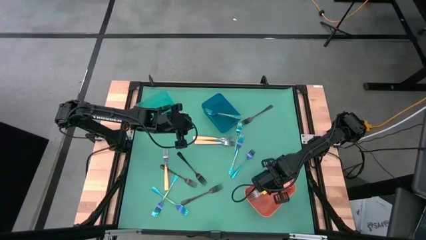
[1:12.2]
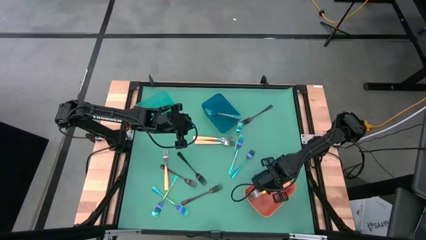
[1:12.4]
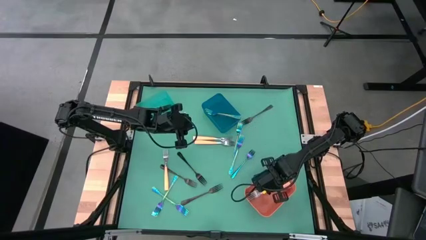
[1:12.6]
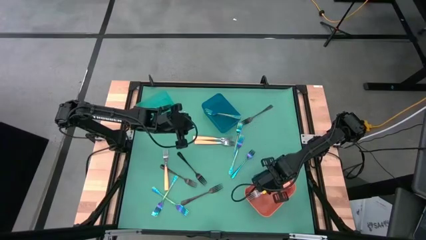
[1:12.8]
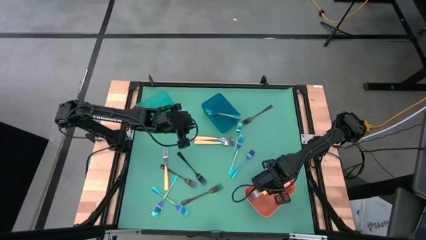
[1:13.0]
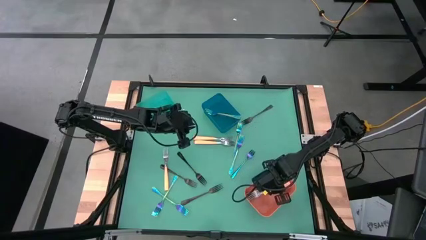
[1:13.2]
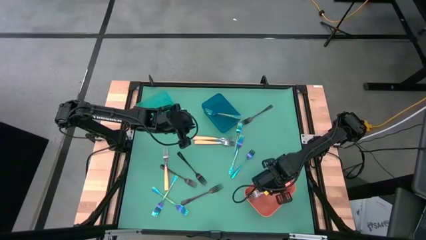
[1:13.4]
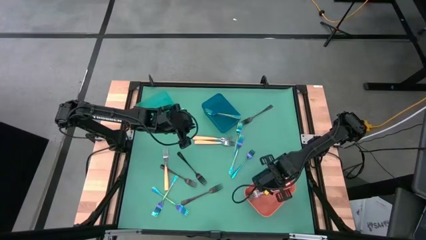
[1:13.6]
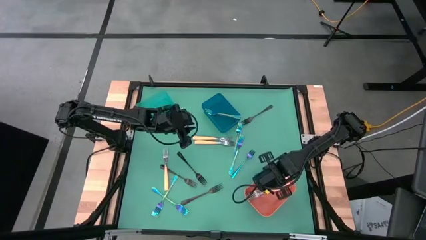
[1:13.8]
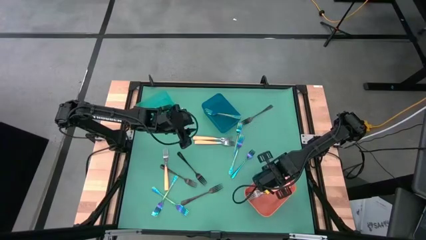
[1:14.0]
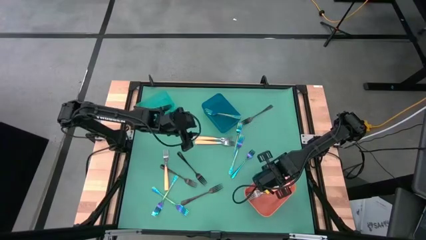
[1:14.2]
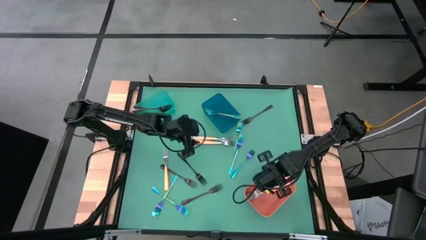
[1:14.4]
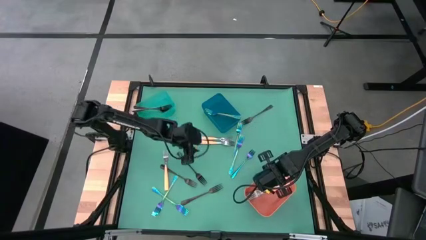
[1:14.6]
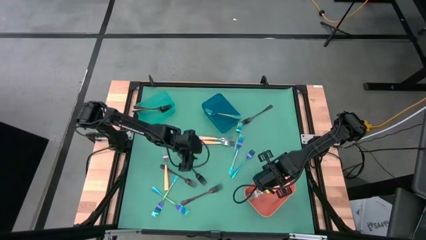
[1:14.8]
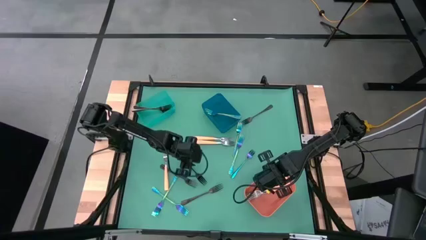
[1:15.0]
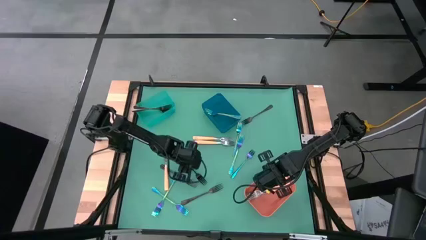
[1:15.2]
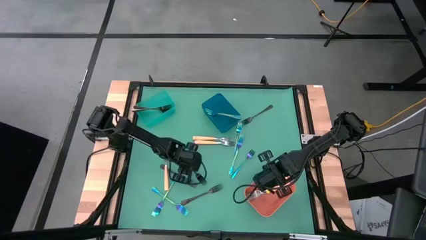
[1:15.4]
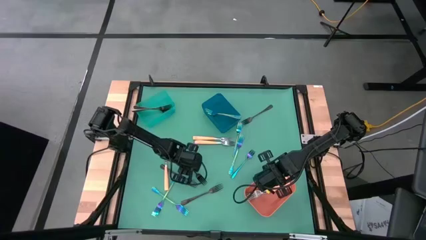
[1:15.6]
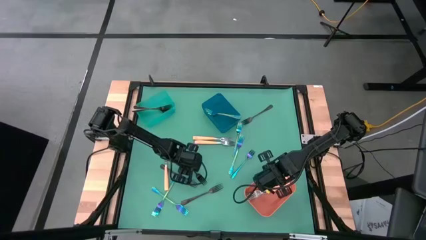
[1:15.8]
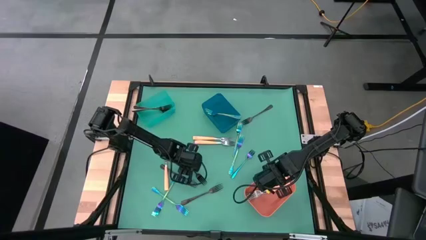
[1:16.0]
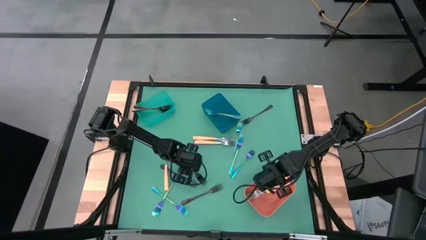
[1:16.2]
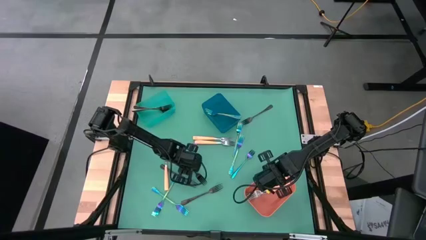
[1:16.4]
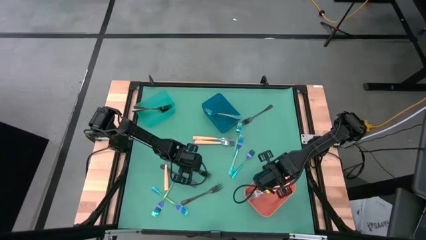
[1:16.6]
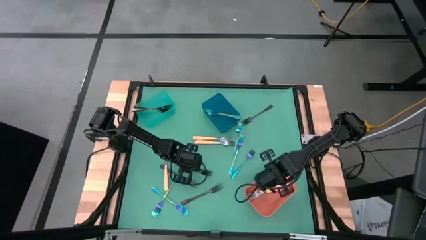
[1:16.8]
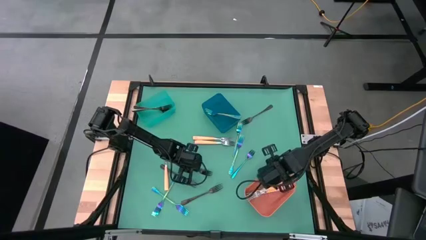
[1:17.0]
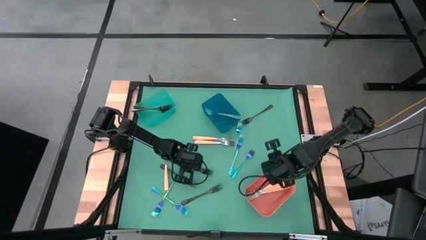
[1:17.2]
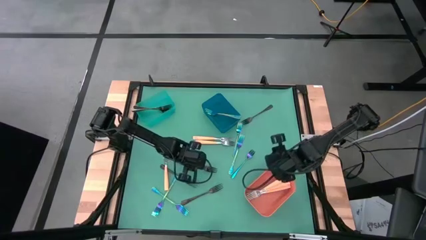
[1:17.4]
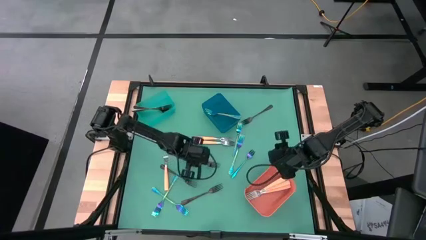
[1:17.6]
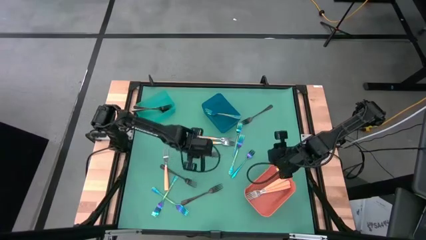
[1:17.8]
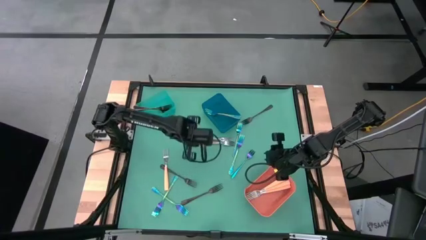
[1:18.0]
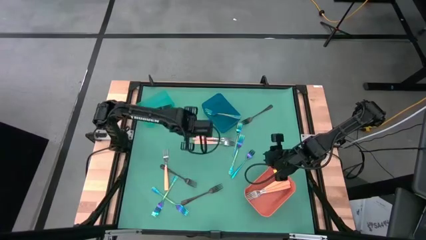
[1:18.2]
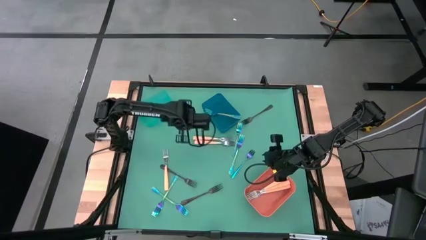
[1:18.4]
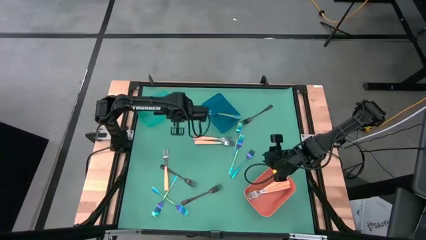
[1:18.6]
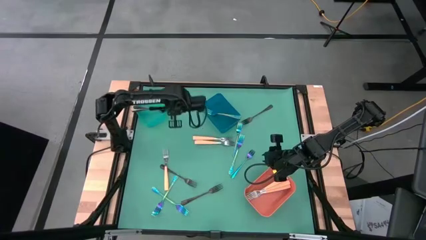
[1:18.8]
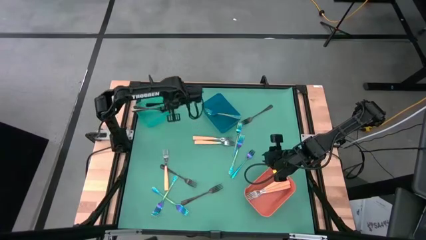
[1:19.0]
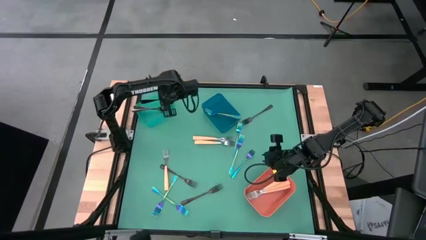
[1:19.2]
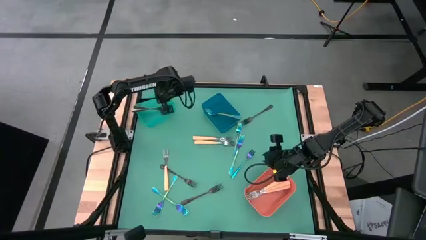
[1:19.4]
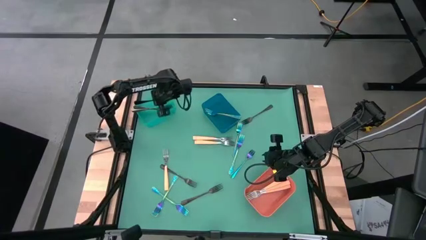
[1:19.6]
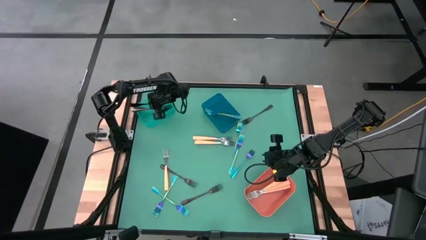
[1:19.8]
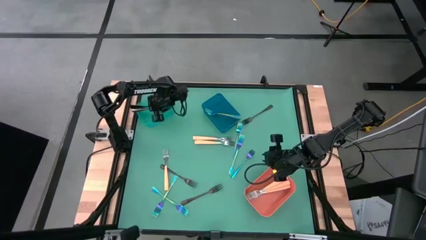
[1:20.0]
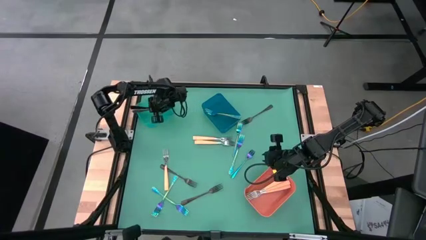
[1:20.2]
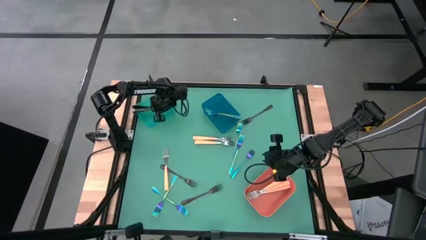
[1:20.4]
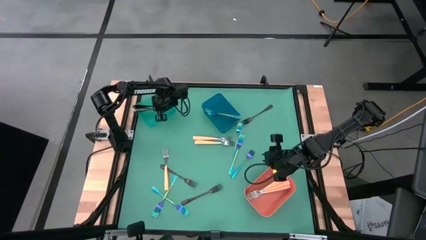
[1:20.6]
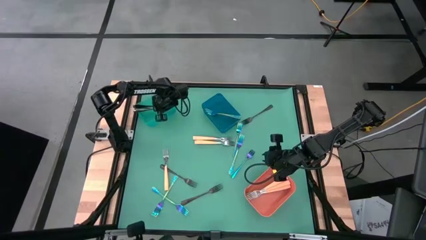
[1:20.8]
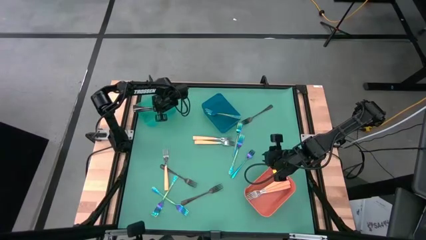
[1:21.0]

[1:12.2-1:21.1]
Task: Sort silverware by color (type)
Put the black fork into the green bin

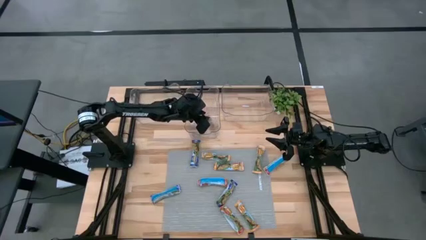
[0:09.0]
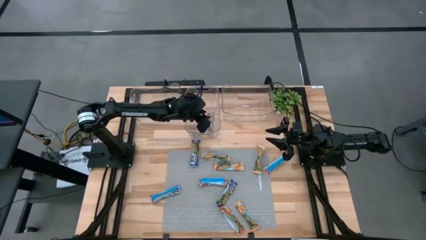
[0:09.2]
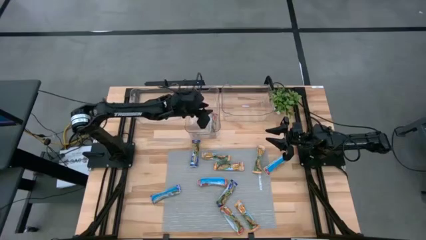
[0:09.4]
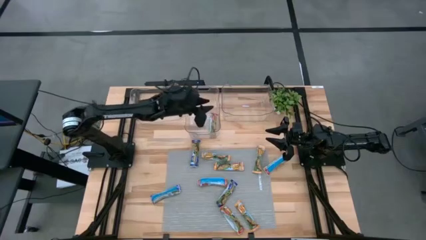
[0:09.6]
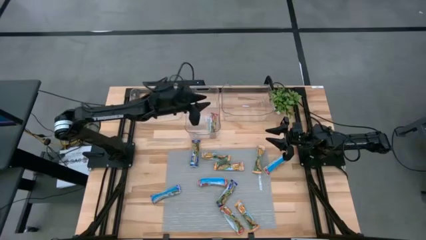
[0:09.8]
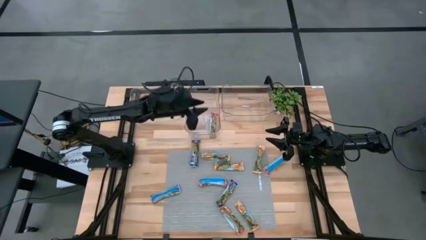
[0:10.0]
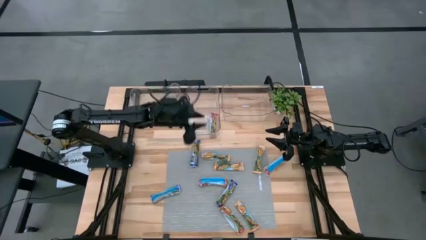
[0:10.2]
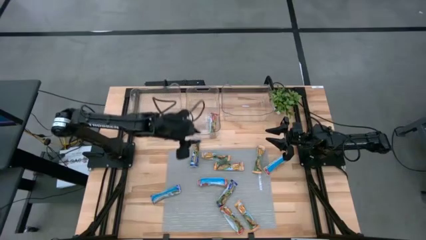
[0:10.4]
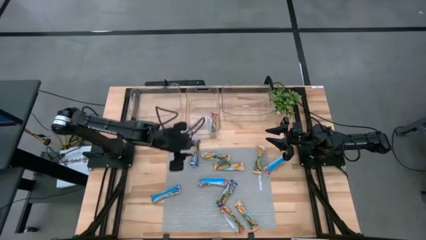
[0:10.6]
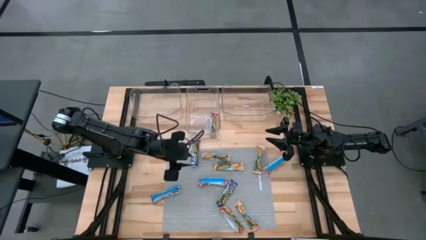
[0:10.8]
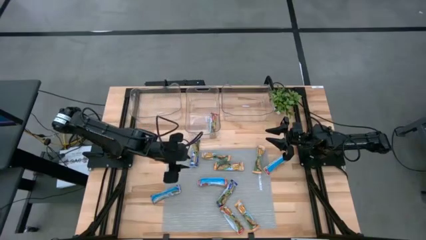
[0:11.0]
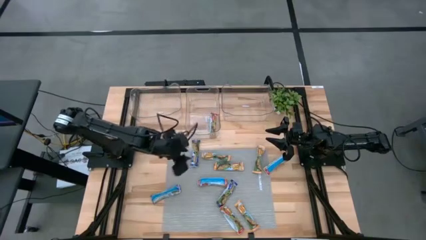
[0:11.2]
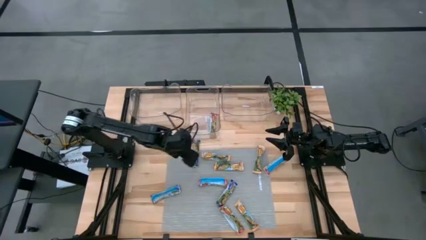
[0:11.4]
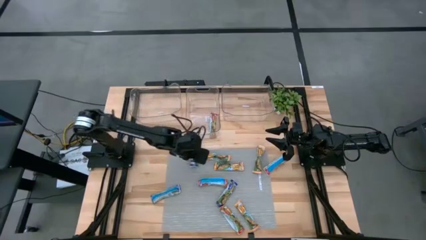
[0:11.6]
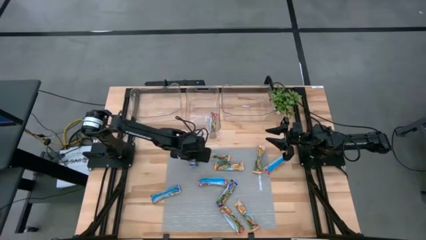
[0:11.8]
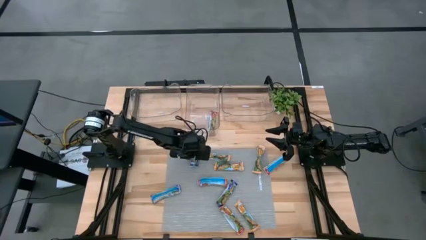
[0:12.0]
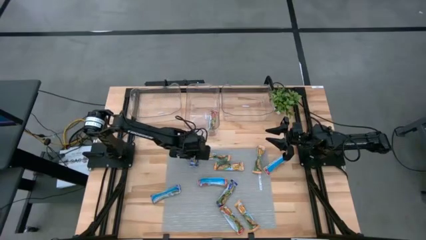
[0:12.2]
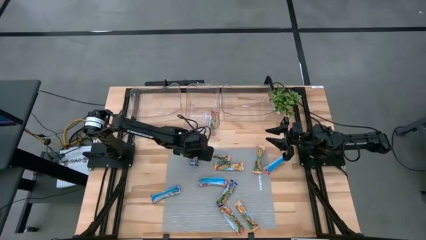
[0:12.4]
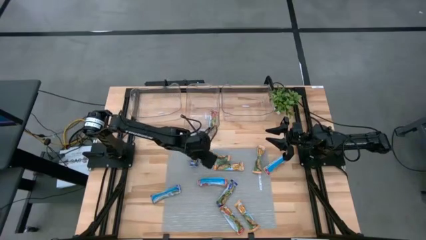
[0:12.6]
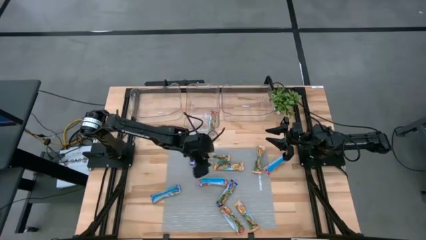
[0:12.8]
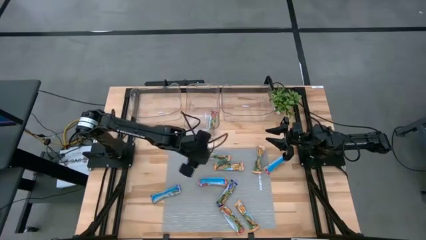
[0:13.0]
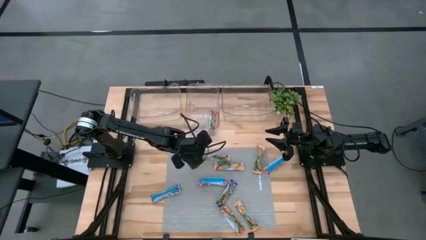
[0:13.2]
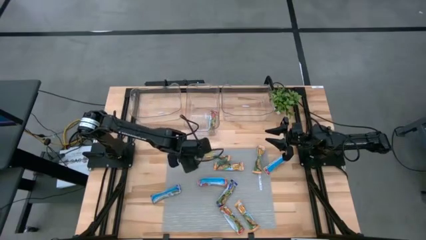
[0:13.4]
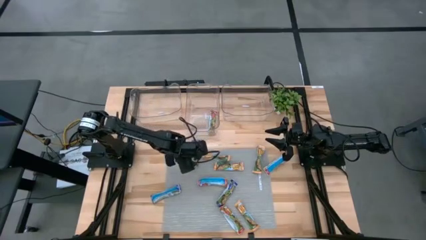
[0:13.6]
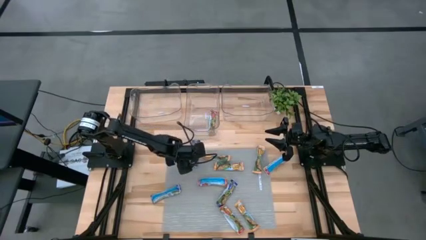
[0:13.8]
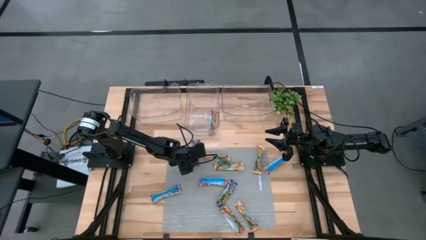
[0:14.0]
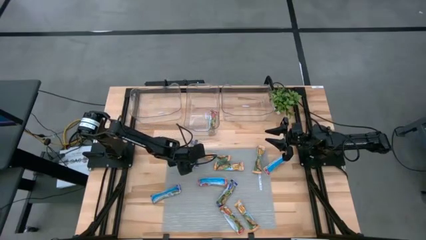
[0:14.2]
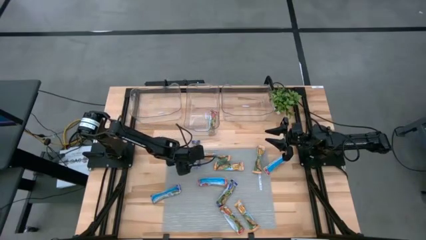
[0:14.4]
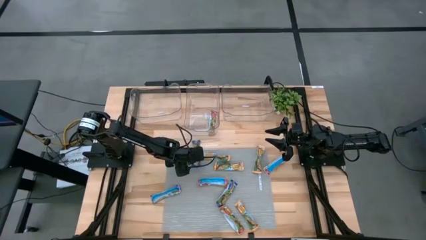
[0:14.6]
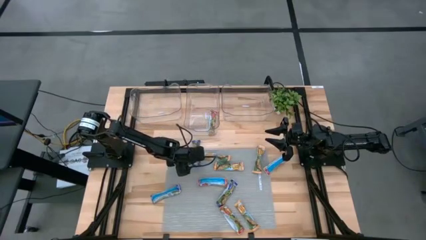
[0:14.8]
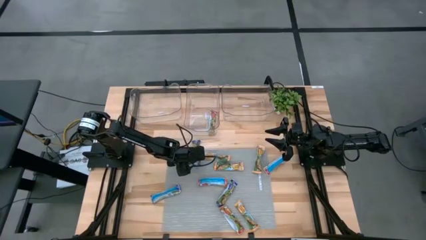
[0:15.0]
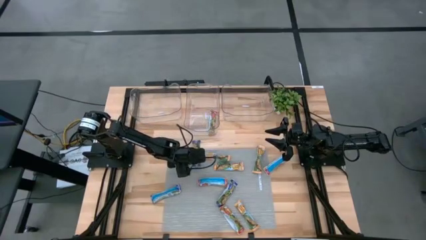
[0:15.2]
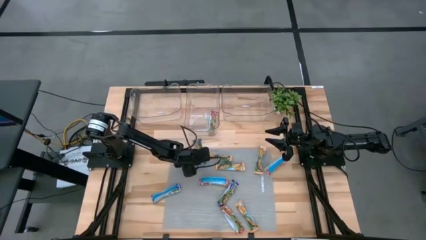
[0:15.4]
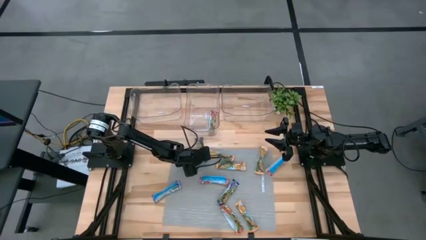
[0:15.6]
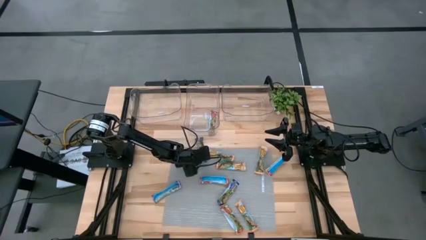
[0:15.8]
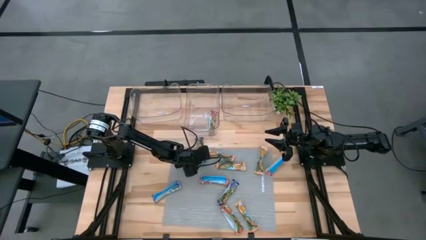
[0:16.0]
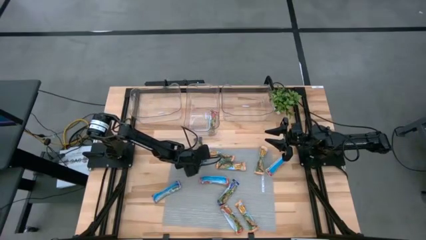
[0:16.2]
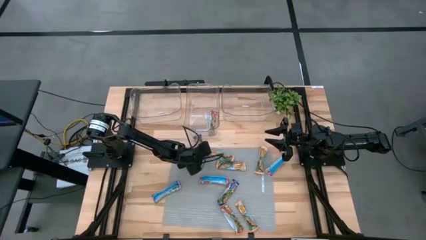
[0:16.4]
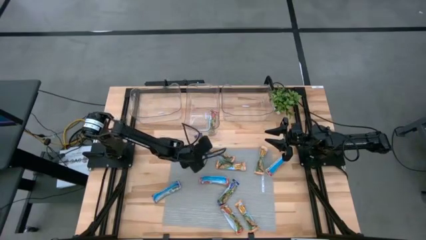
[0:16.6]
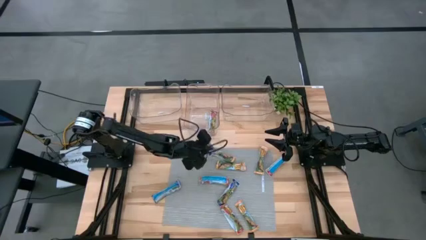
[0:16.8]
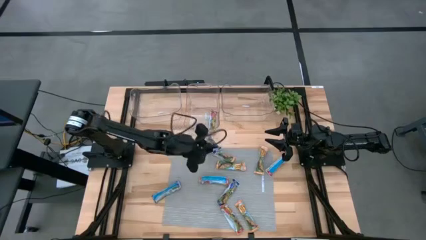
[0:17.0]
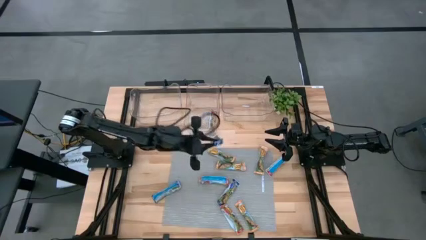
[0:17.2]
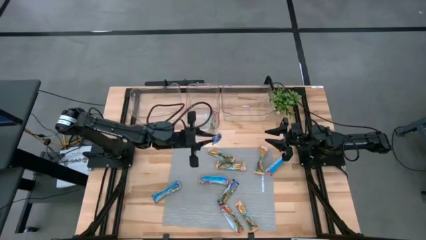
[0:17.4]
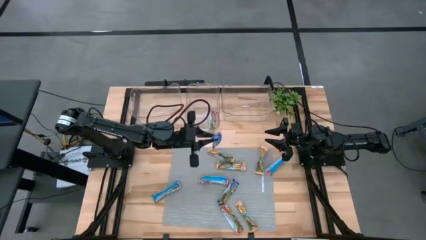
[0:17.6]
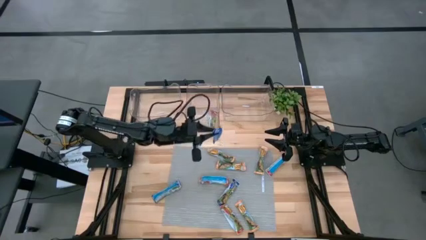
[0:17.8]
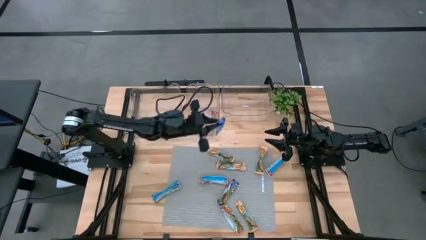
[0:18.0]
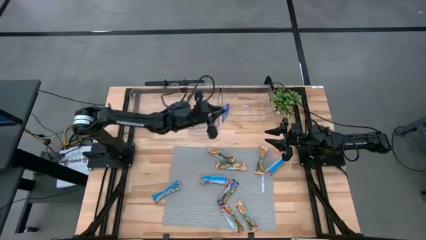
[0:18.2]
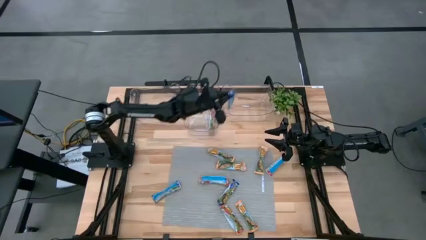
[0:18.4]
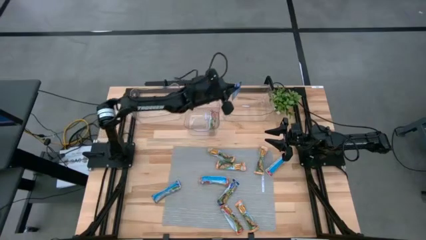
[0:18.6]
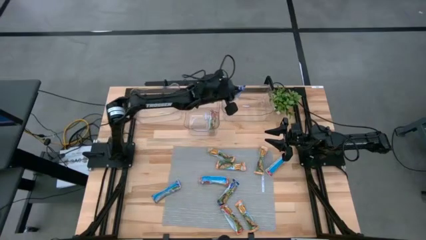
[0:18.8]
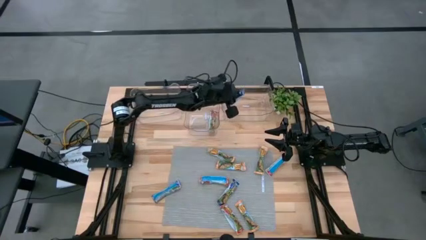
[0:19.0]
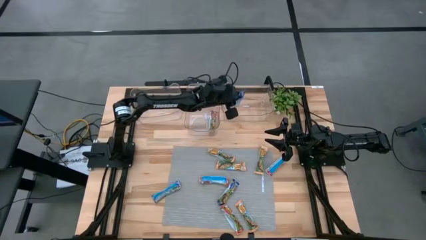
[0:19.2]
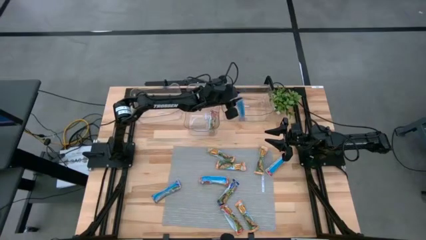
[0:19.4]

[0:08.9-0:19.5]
Task: Pick and place Granola Bars by type
Put the blue granola bar into the right transparent bin
